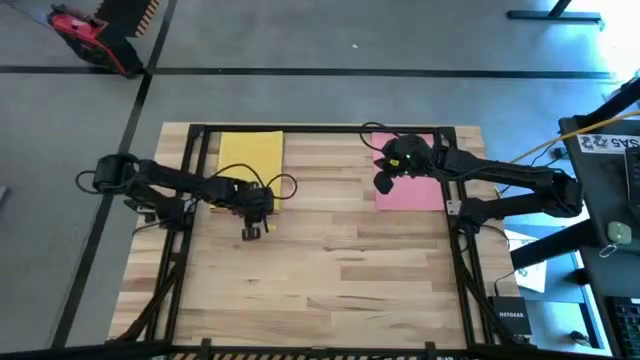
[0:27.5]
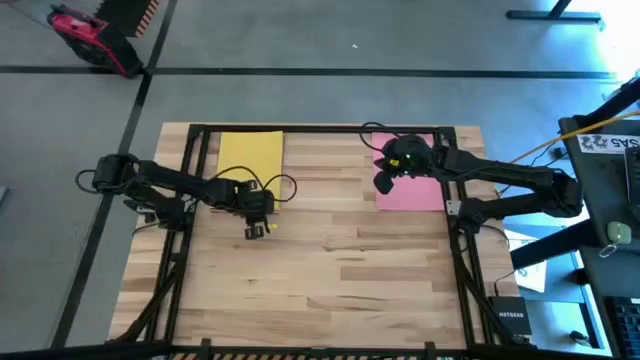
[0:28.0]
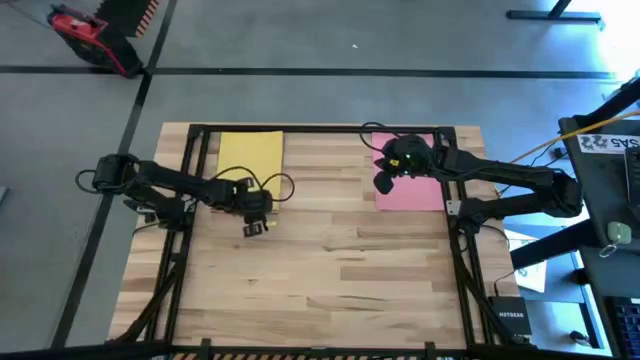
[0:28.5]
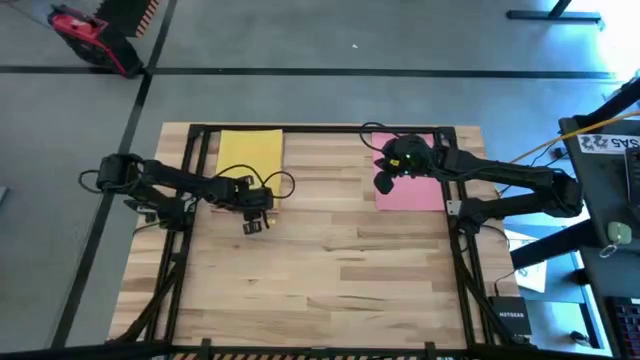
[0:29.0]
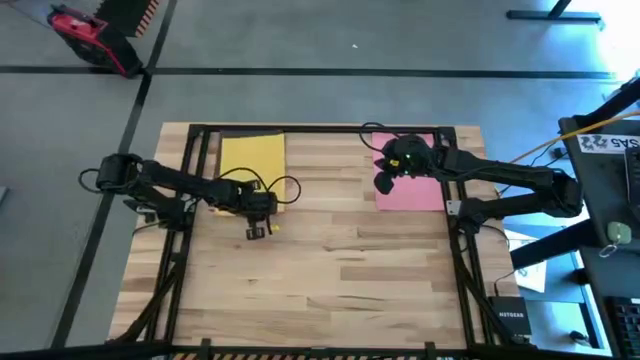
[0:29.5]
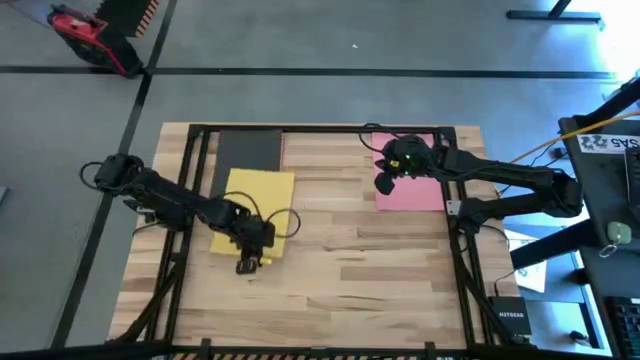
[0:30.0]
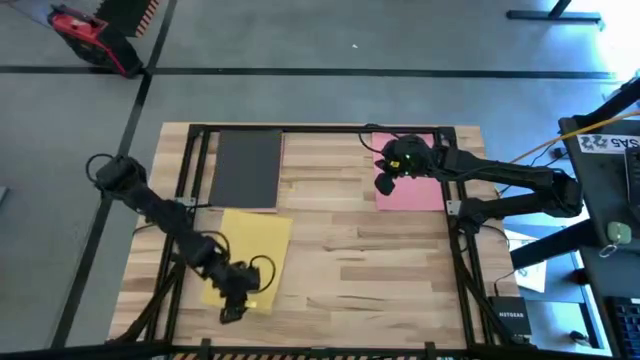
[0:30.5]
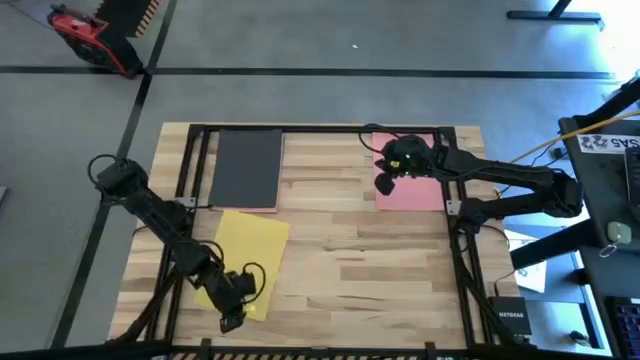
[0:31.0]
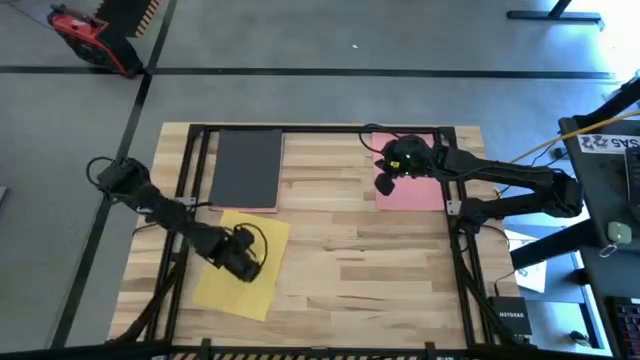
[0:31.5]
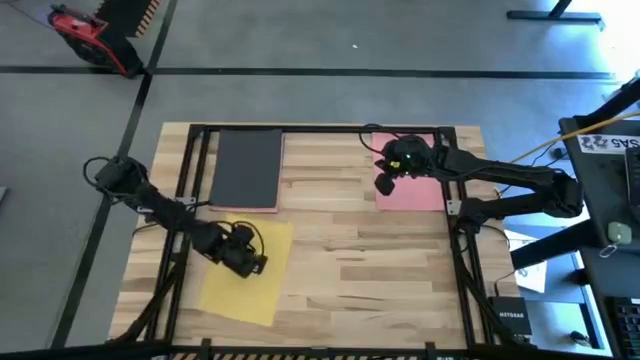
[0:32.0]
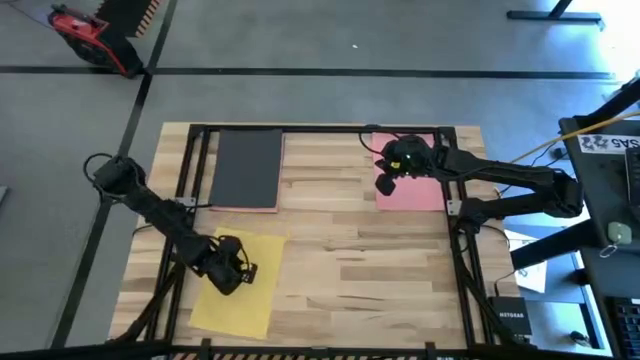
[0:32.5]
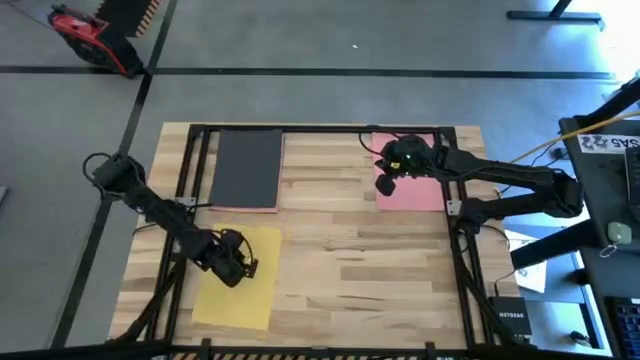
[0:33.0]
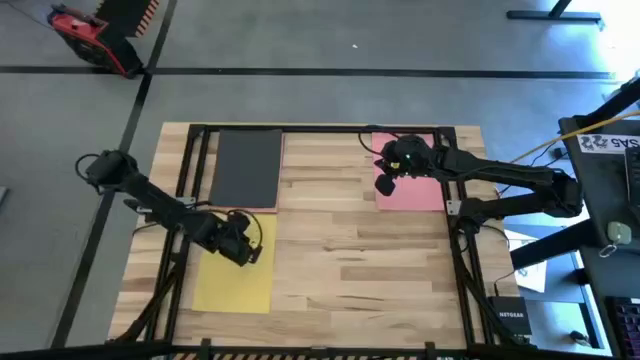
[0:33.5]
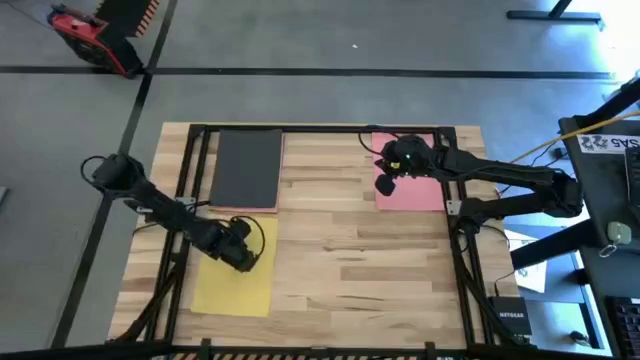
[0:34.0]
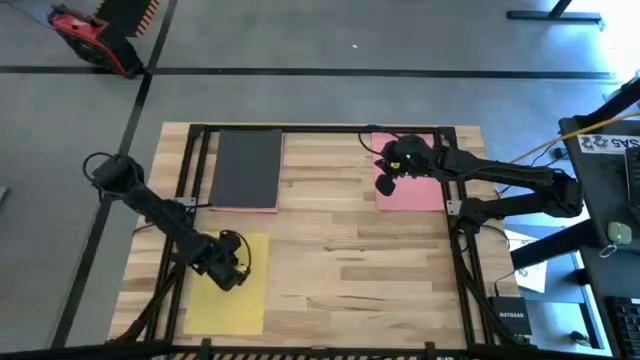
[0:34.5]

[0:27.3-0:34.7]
Task: Organize paper
Move the yellow paper to the bottom left of the table

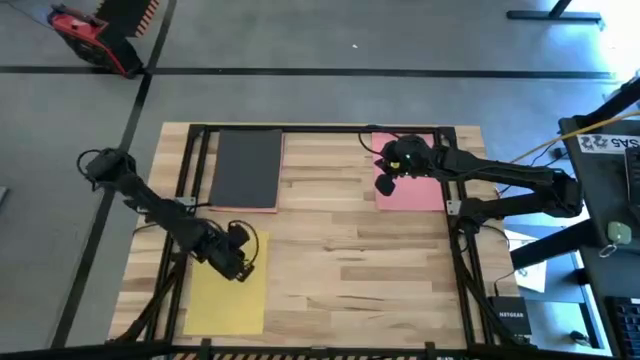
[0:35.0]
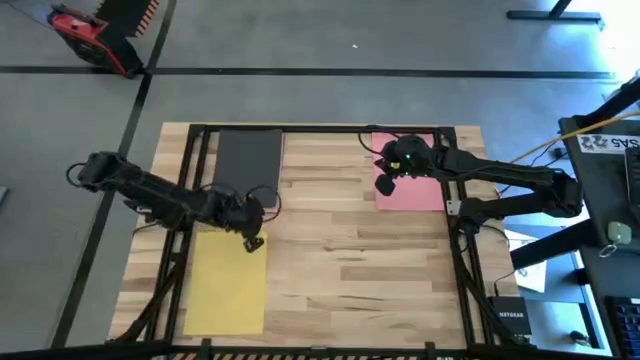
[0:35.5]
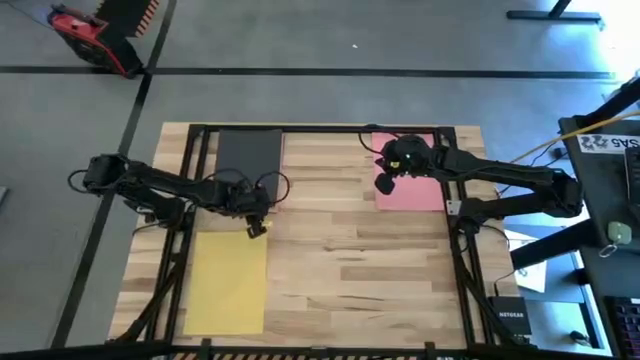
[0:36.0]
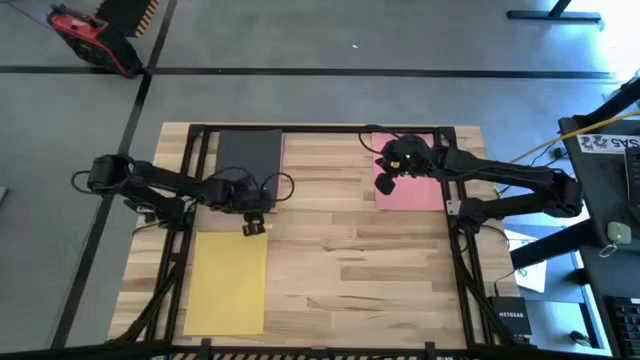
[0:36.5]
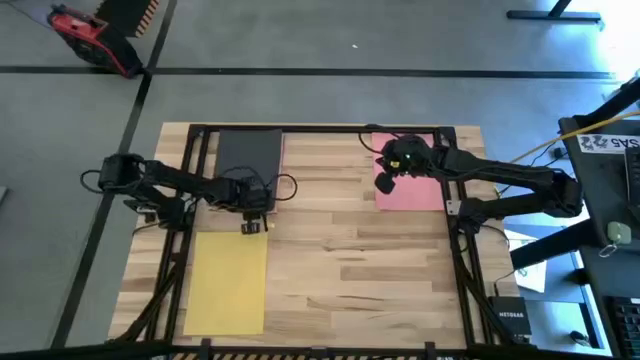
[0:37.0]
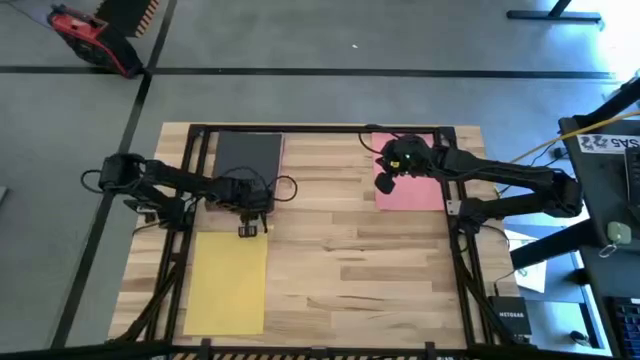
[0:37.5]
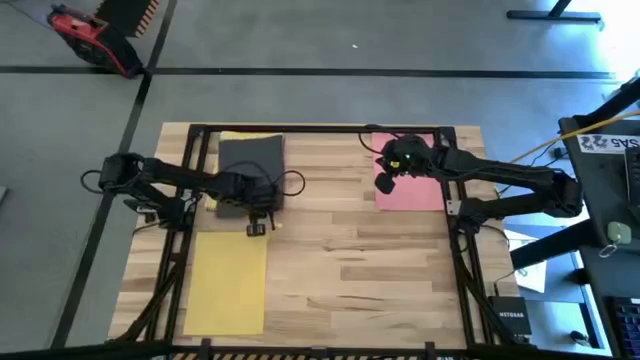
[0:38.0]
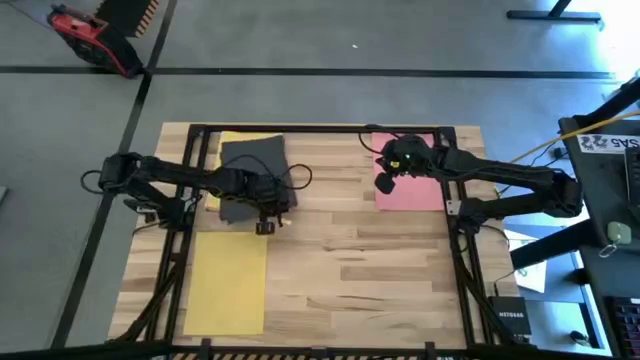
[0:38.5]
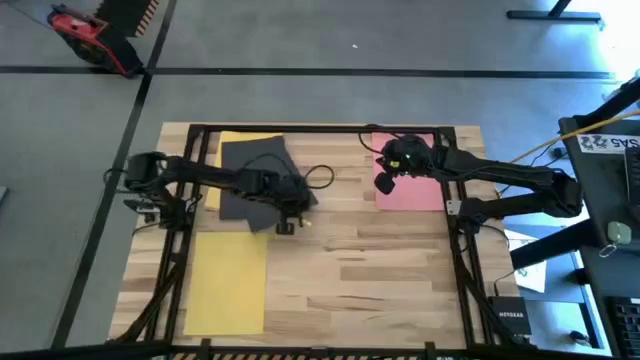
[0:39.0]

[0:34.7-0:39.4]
Move the black paper to the top center of the table

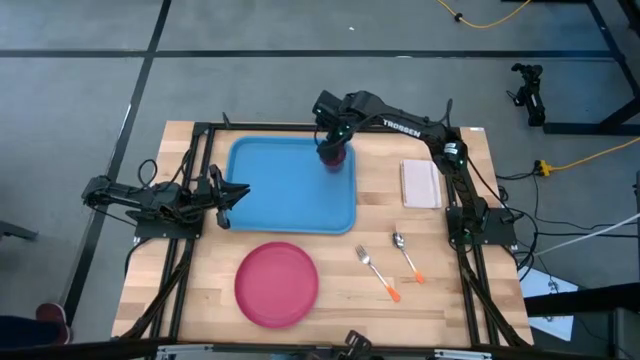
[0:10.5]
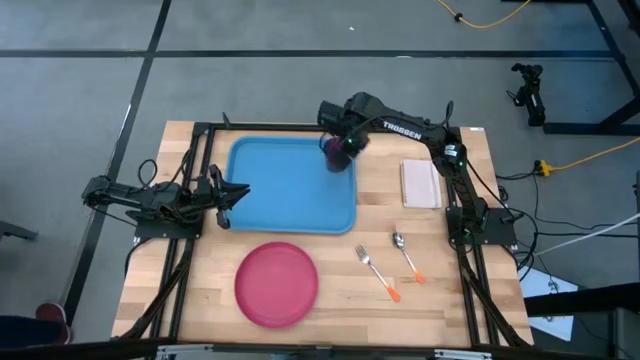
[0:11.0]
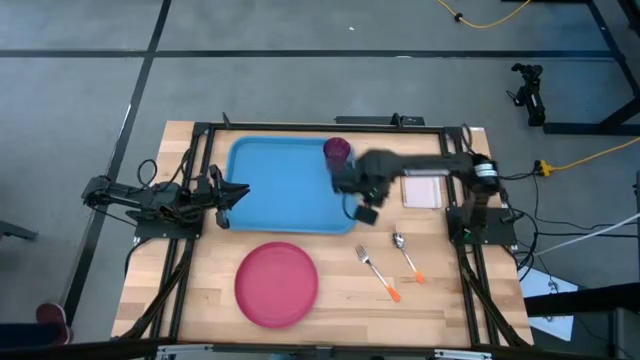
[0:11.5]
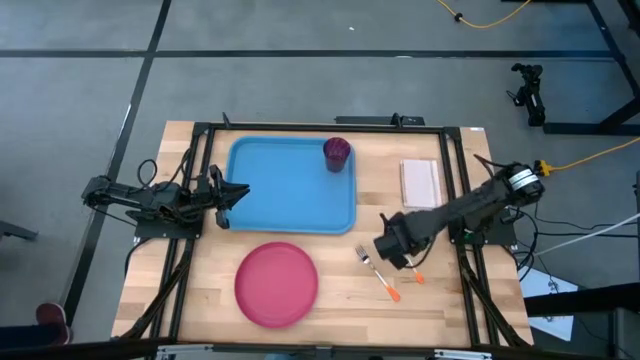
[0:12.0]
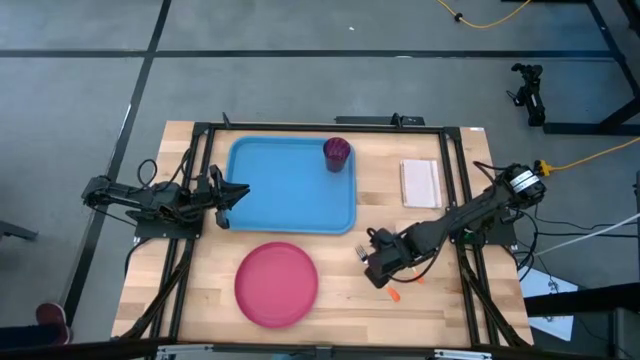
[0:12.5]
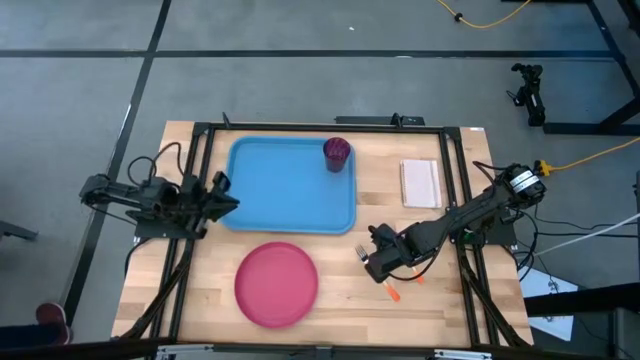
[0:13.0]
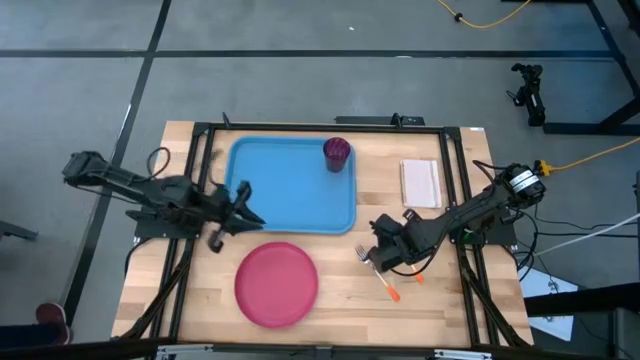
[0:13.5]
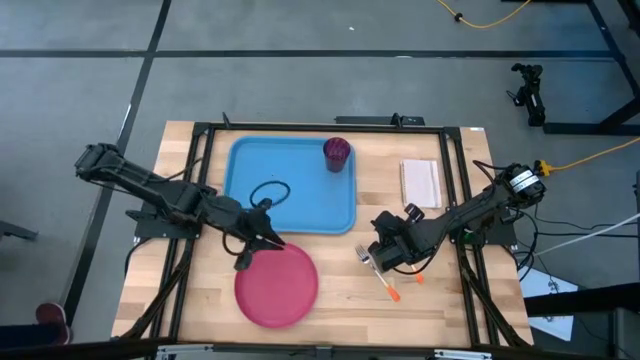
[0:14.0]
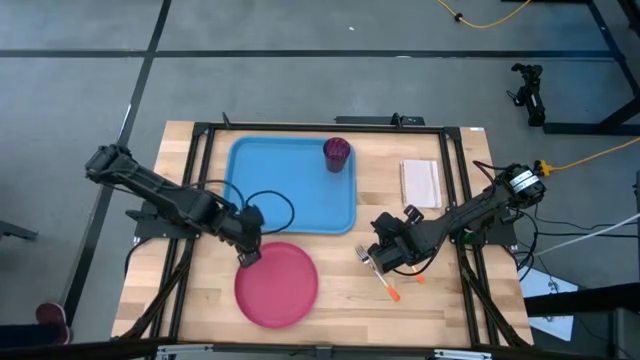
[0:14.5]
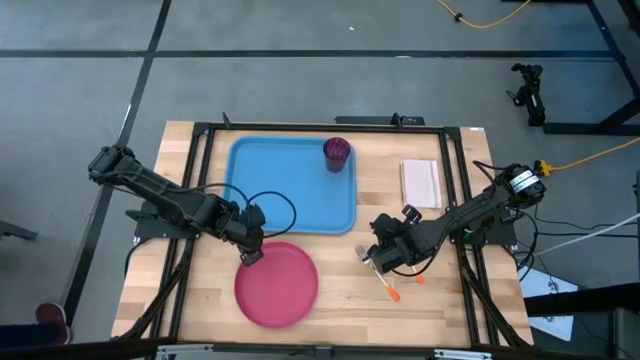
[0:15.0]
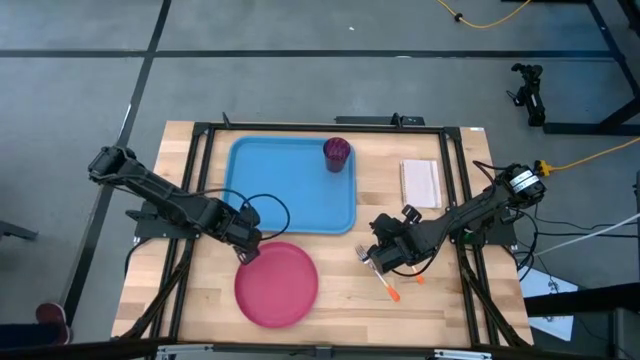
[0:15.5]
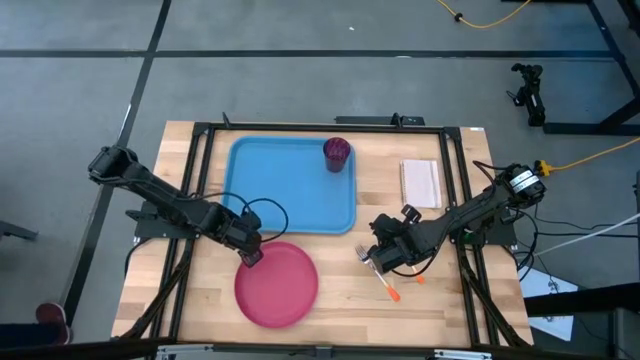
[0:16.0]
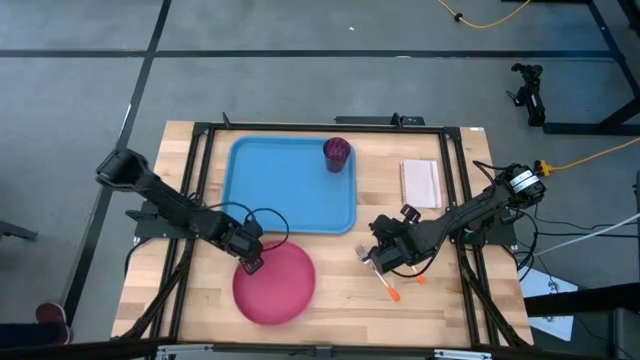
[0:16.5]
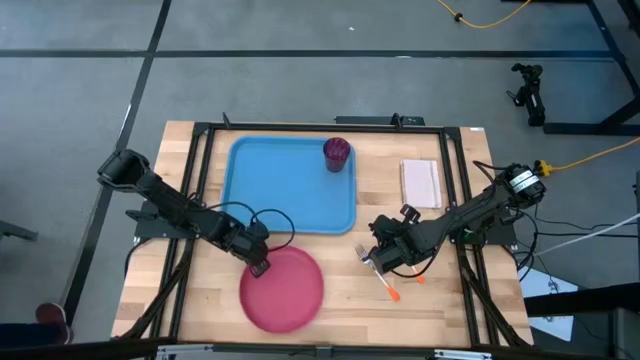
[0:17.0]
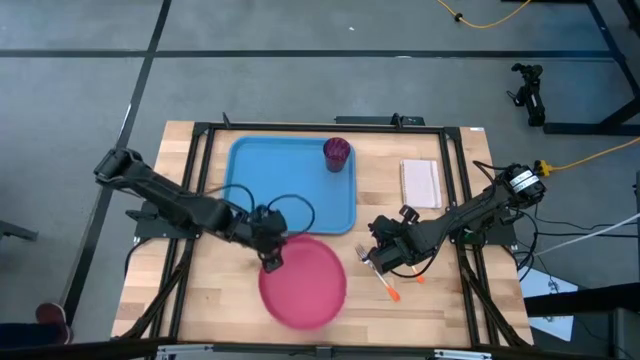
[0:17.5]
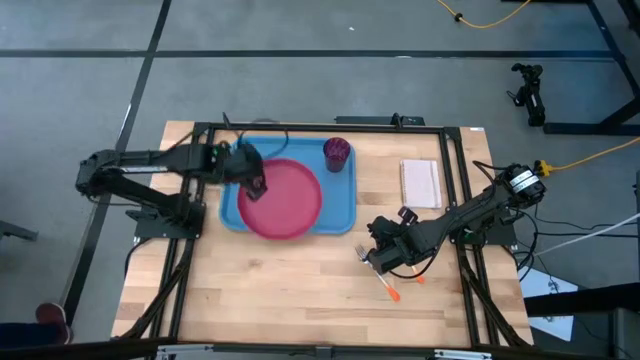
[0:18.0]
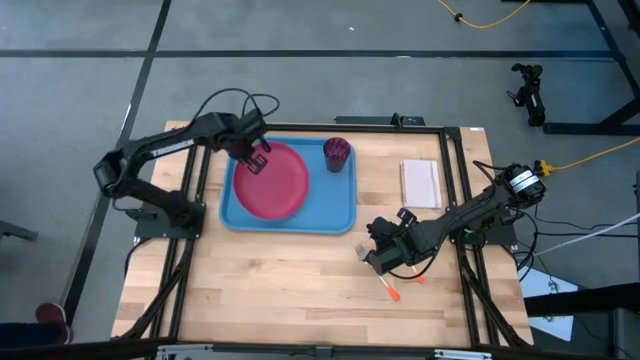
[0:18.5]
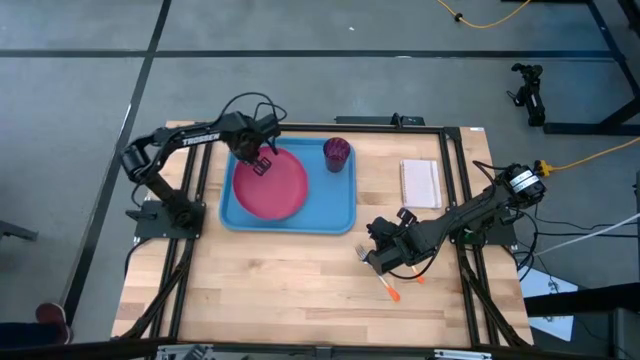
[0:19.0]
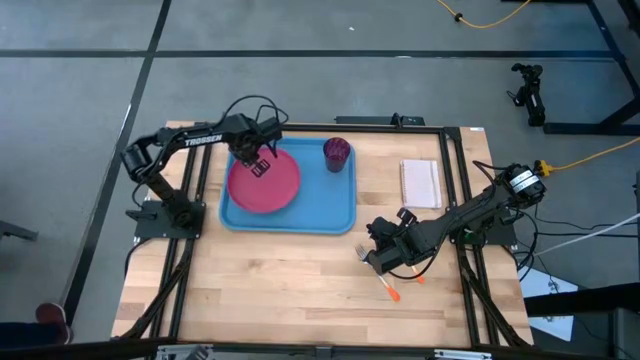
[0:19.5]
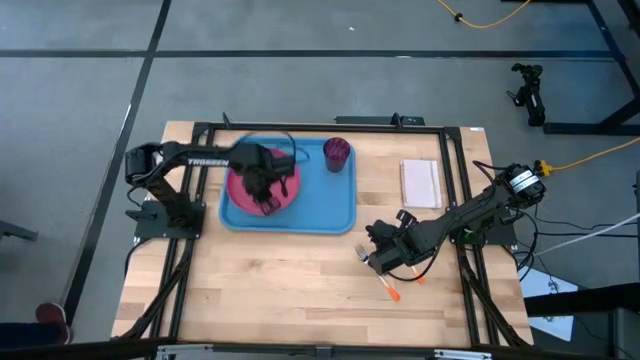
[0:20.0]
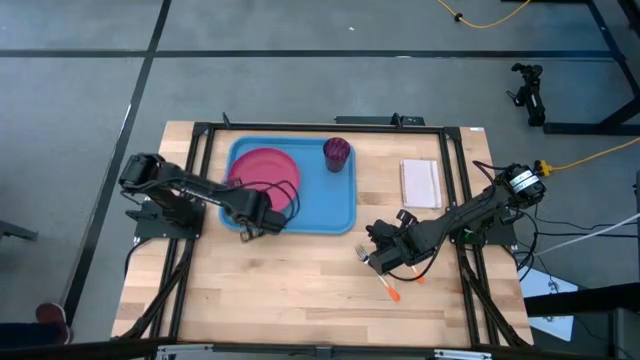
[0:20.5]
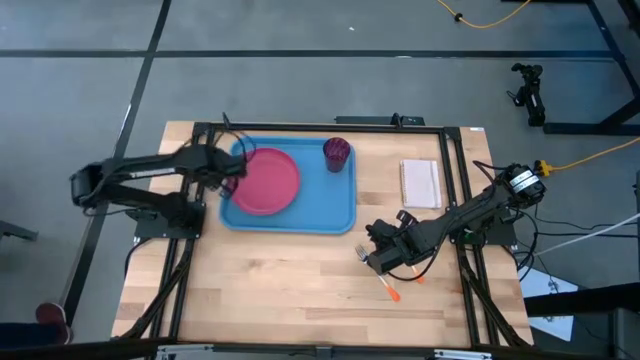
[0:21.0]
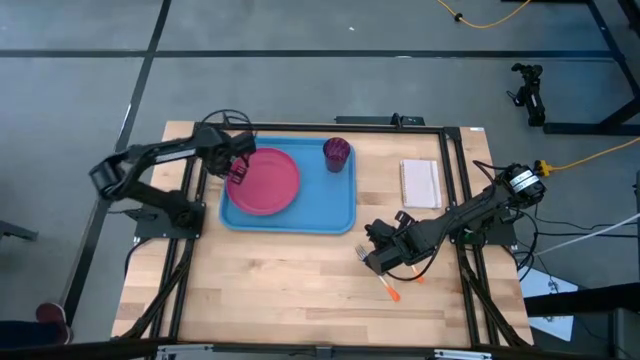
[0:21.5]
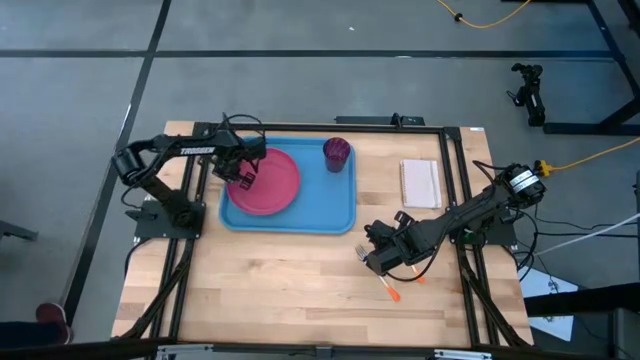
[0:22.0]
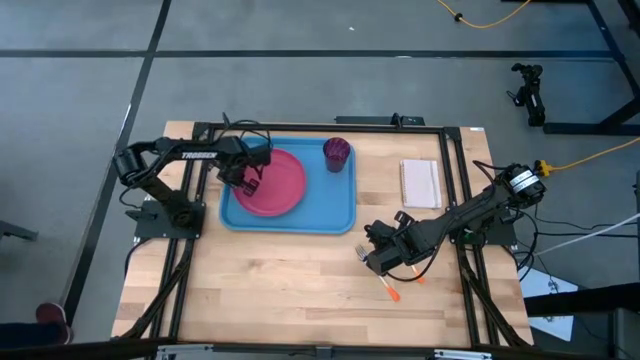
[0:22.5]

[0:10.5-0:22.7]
Task: Pick and place plate/cup/fork/spoon on tray
Put the pink plate on the blue serving tray to the bottom left of the red cup
